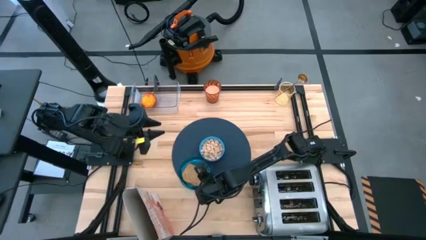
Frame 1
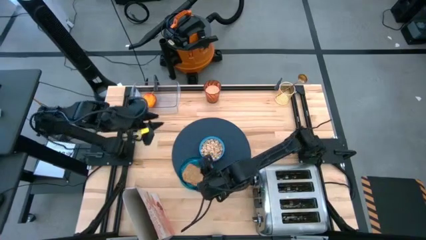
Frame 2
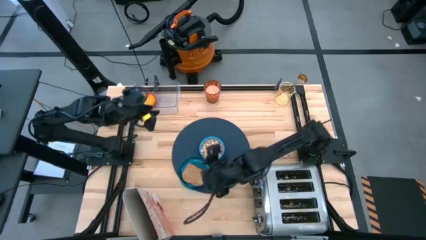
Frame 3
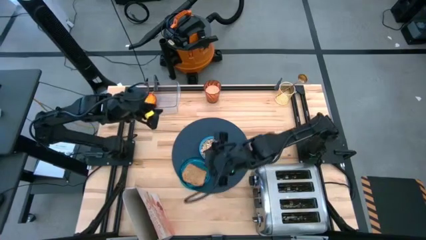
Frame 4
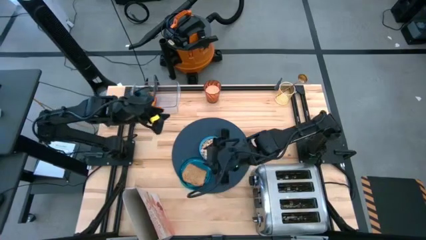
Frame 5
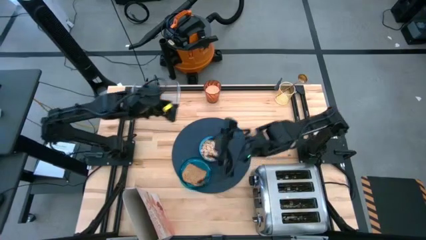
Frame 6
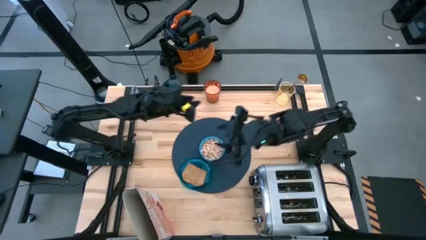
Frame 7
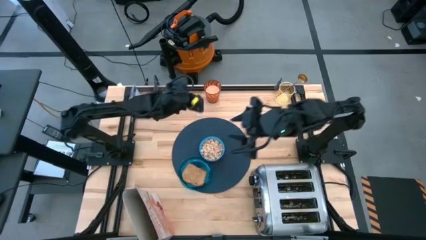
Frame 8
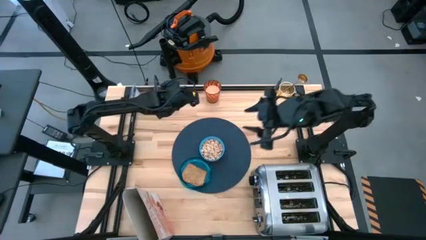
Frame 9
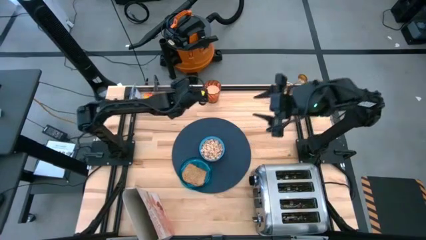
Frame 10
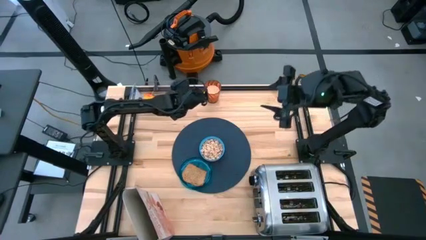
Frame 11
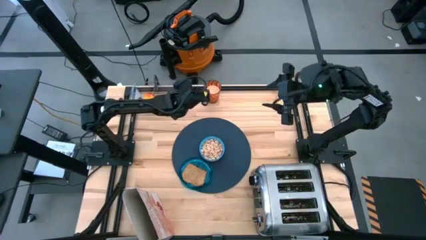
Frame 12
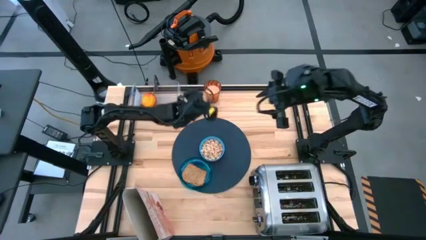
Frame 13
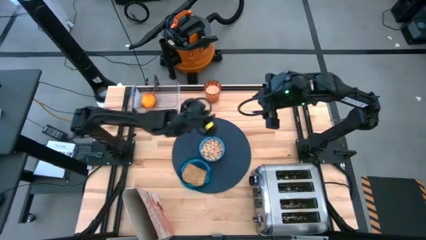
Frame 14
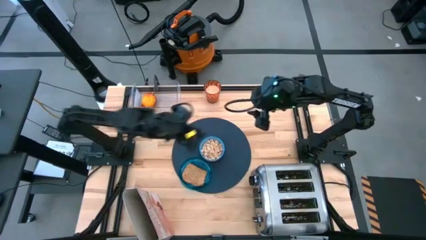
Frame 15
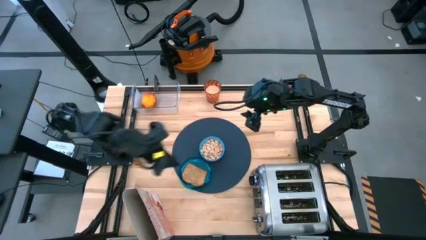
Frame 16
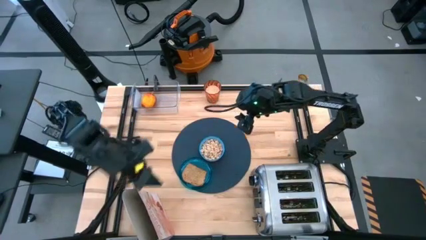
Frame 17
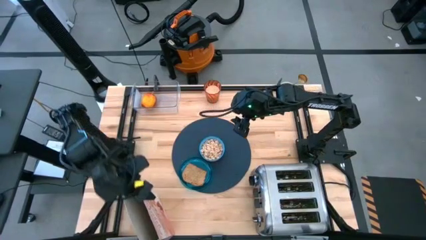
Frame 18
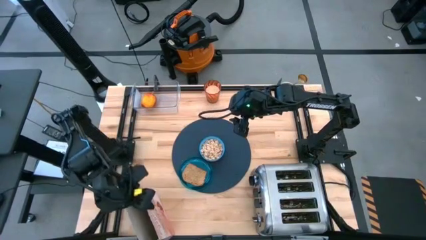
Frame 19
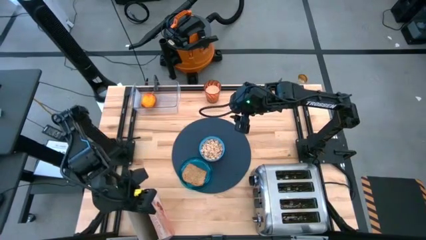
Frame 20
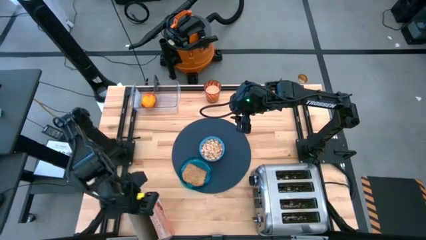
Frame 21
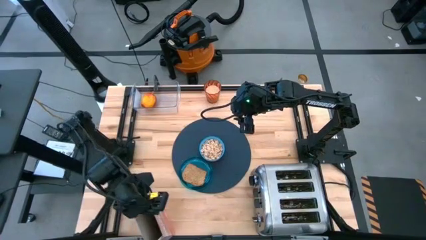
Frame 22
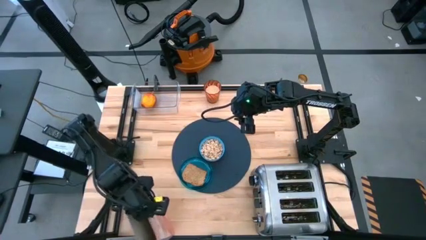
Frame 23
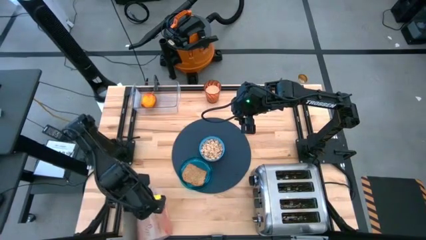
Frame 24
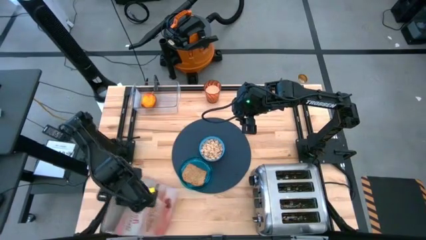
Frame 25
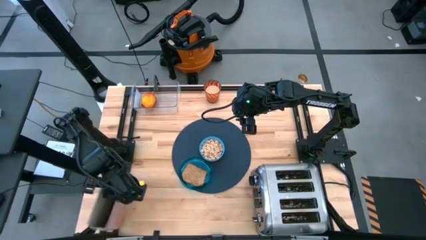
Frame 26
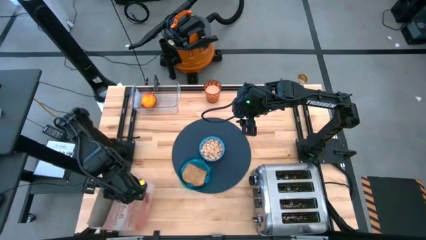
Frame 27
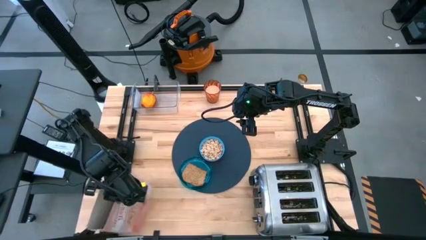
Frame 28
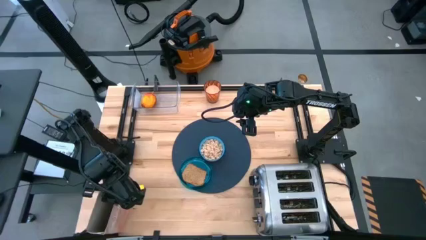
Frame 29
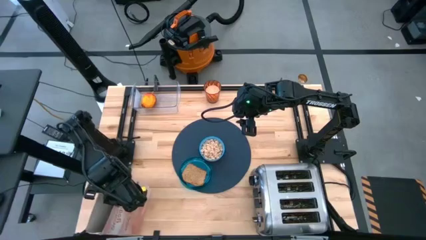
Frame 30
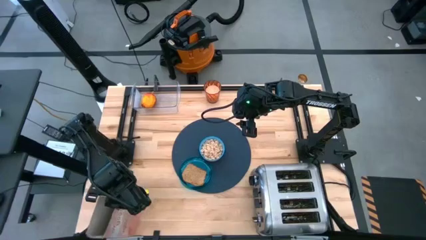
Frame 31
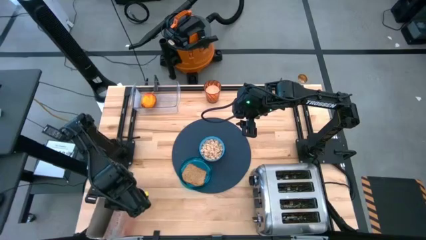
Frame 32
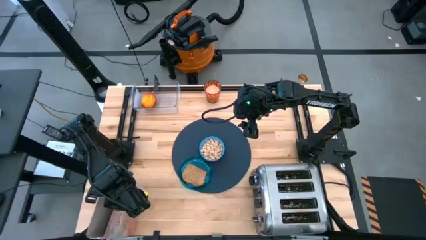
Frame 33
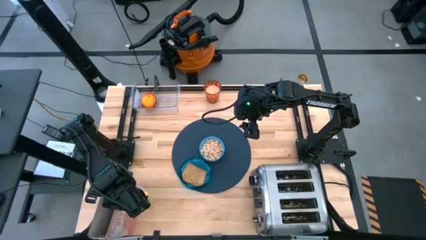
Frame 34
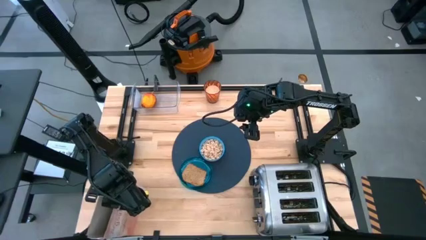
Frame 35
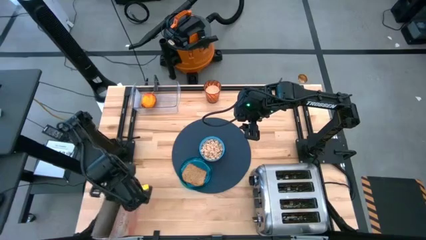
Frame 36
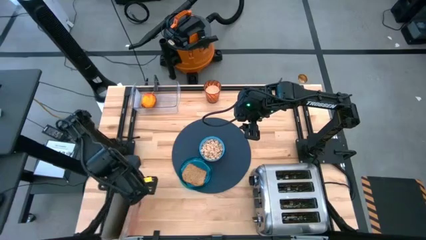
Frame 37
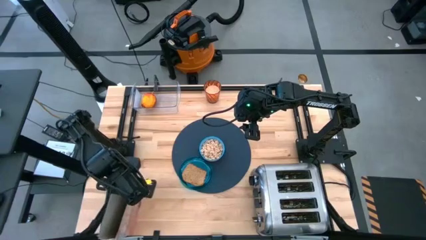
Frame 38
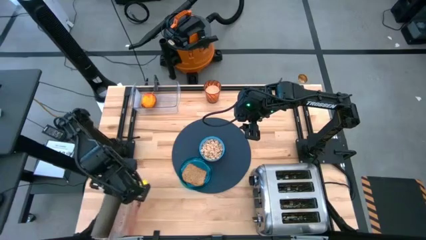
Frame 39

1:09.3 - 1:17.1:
Task: Arrange a breakfast setting
Adjust the cereal box on the table

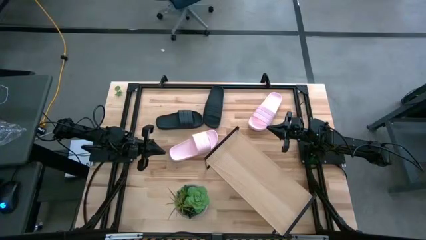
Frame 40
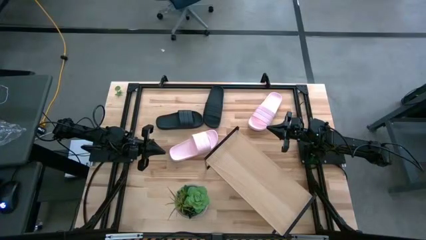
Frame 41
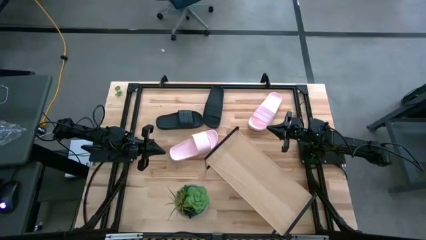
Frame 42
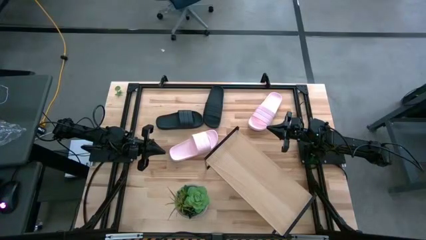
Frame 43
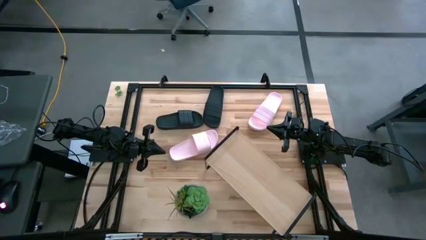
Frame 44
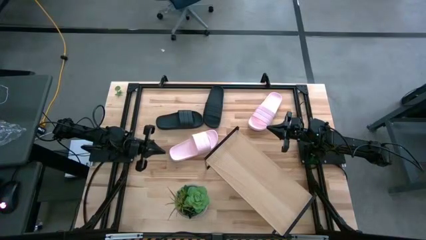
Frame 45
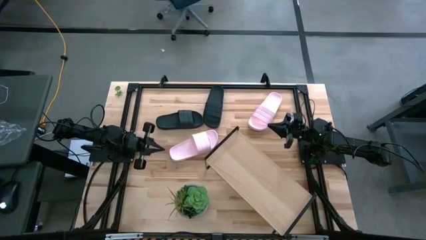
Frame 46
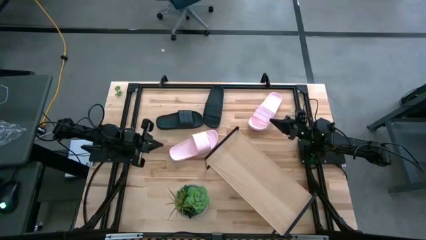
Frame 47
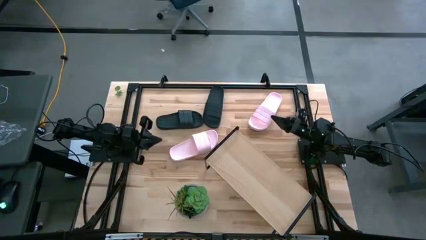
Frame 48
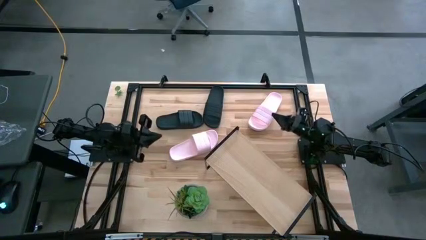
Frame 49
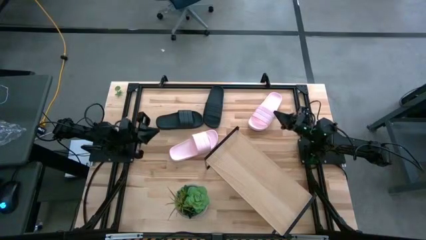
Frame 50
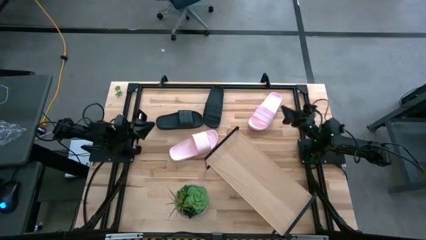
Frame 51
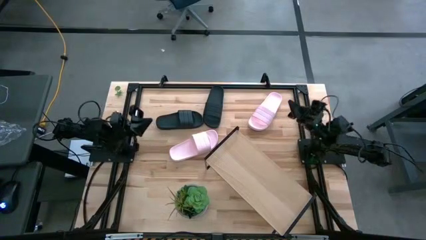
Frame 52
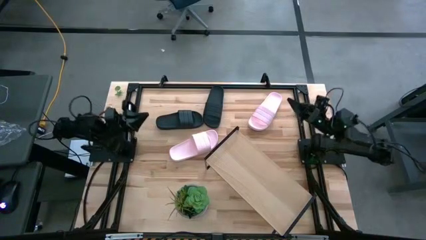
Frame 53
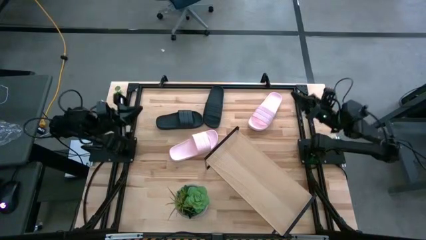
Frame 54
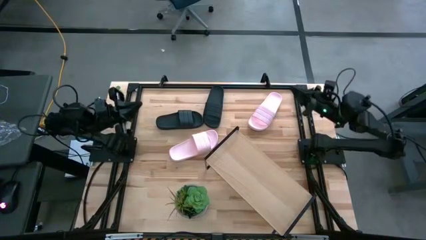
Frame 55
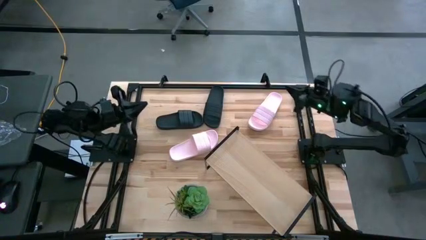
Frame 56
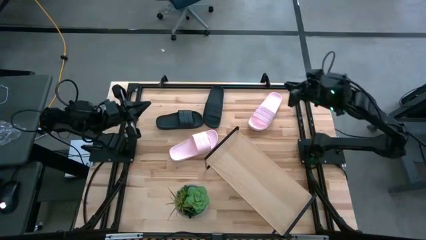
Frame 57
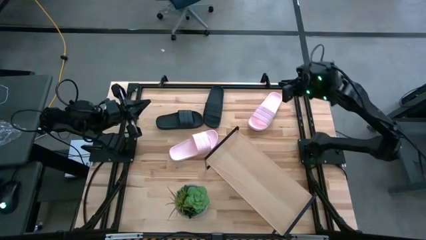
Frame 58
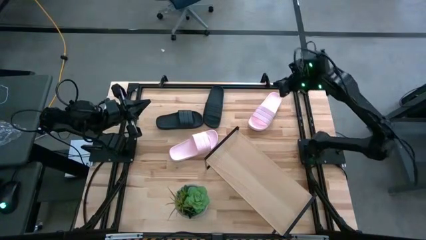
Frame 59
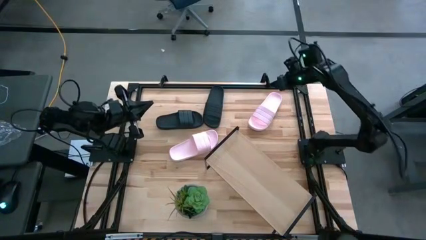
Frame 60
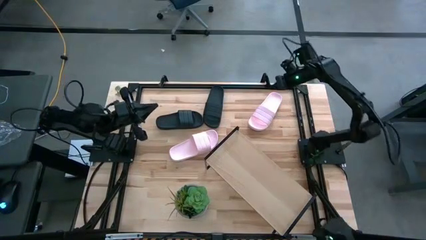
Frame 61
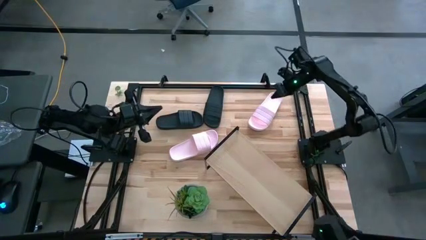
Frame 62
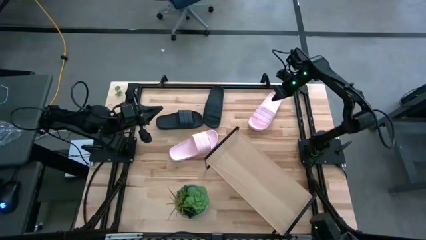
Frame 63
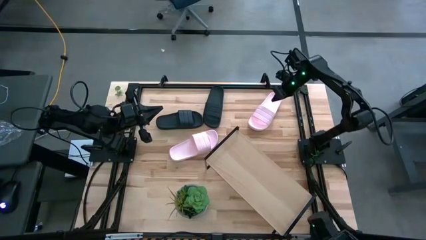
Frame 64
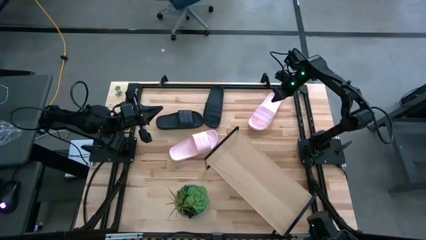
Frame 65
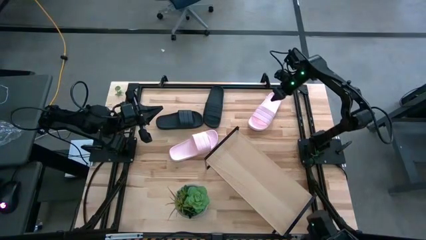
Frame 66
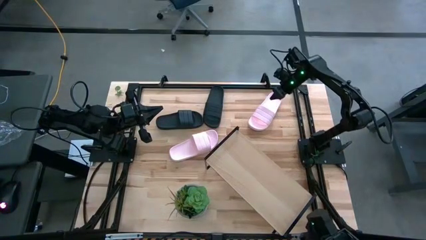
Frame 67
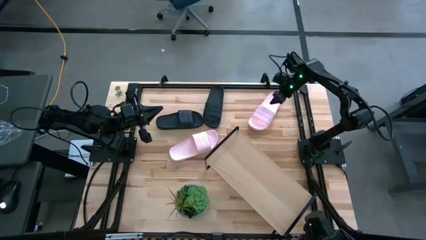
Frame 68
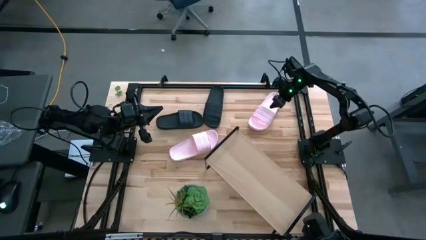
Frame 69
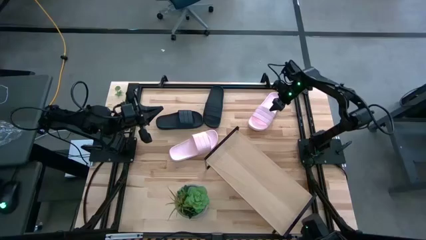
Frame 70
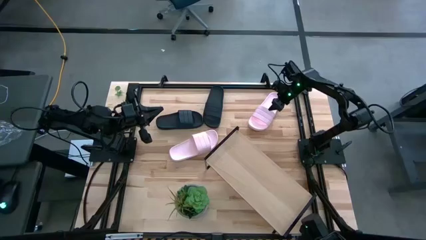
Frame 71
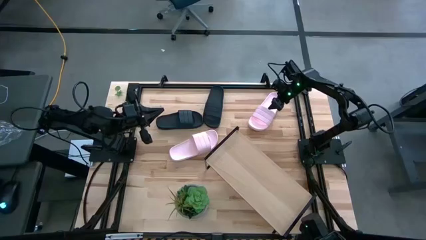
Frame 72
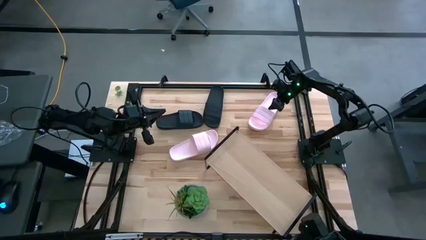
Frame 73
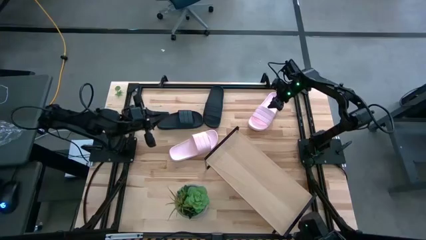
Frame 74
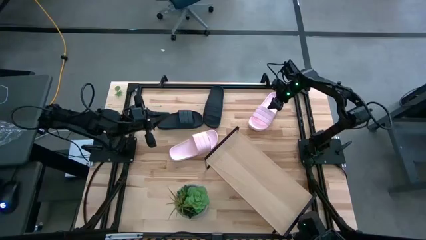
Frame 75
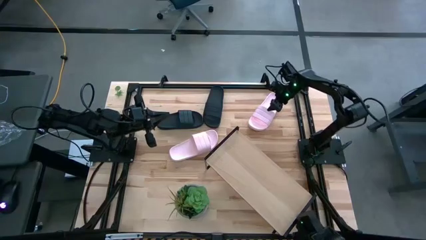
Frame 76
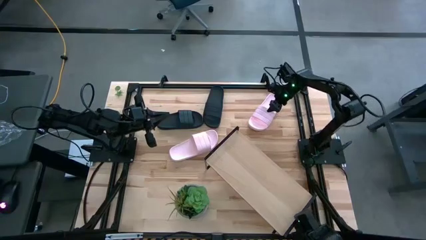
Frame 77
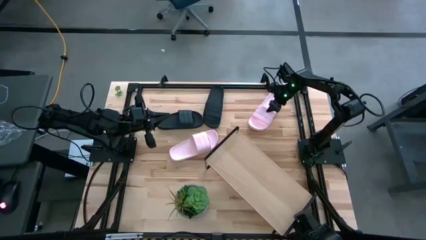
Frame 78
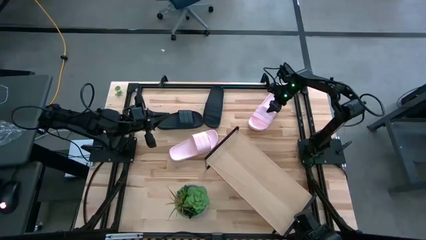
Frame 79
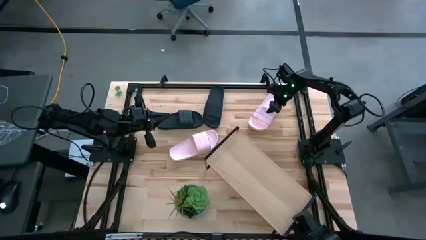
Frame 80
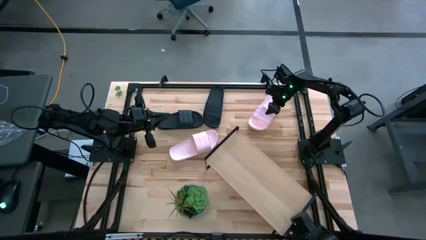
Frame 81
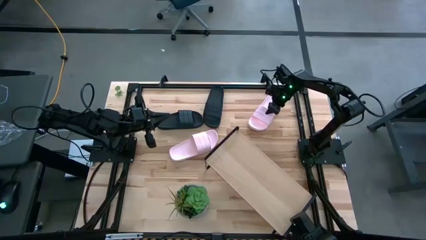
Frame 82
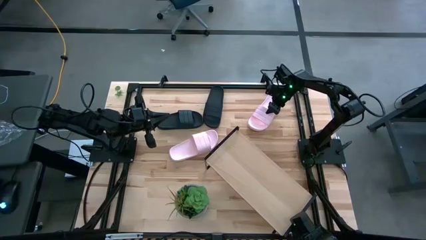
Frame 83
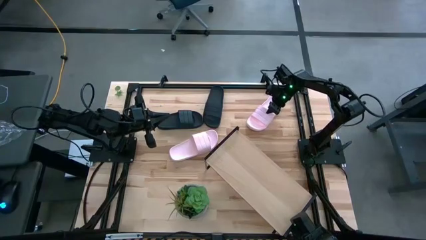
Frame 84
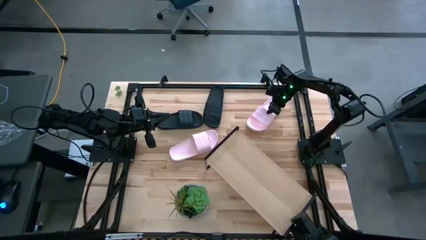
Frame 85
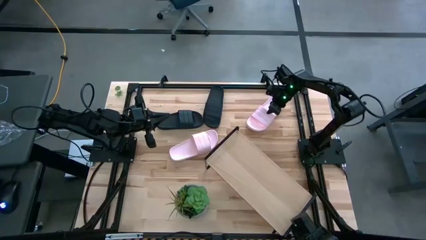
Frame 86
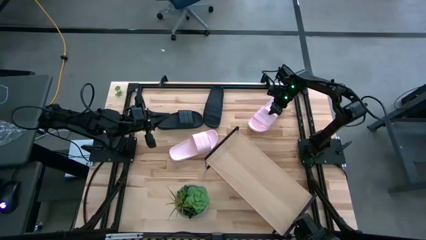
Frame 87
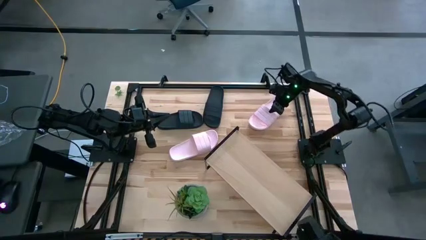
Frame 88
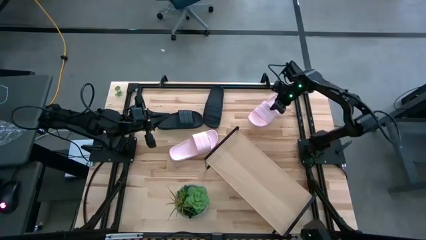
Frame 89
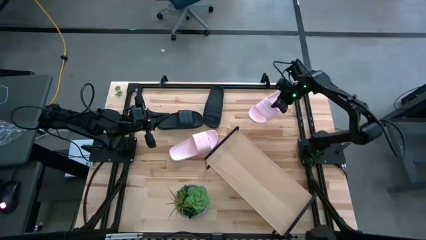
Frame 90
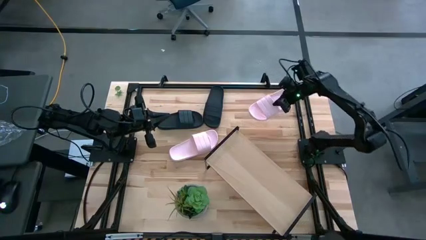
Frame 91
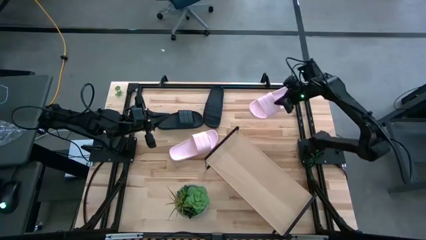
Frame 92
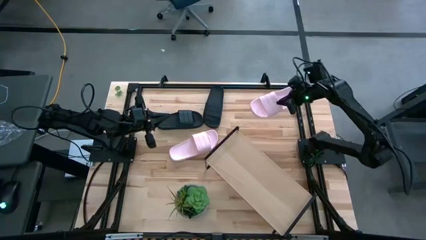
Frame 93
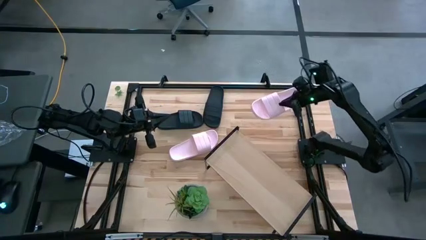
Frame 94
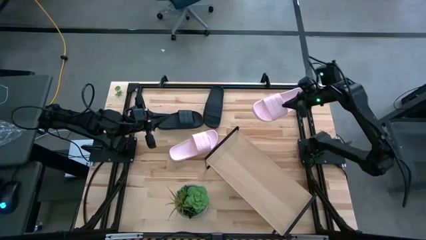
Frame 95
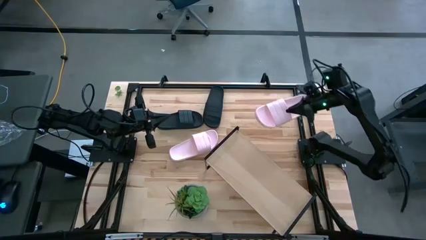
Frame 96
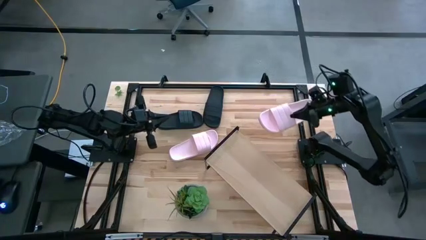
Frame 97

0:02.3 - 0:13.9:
Task: Pick and place slides into the shelf
Put the right pink slides on the shelf
